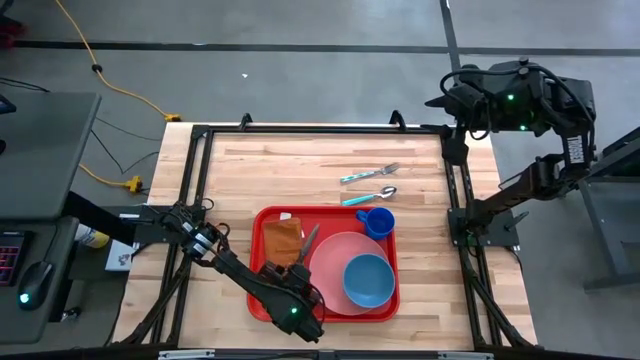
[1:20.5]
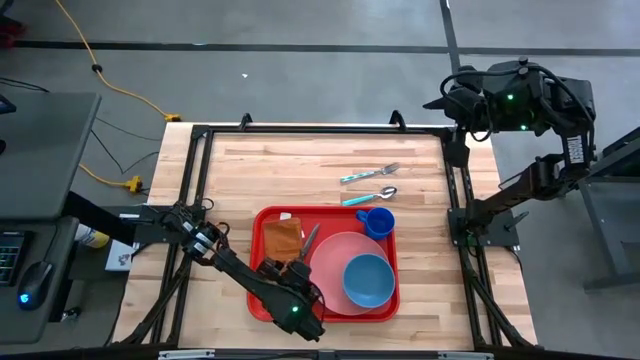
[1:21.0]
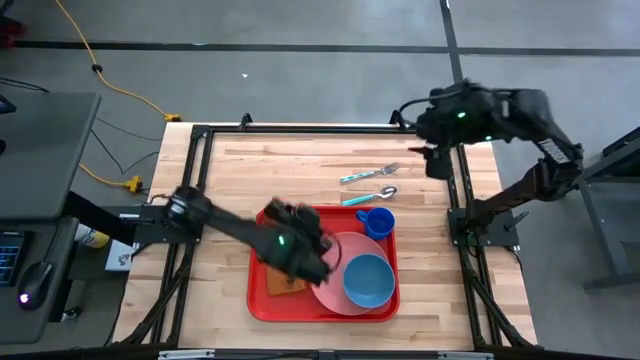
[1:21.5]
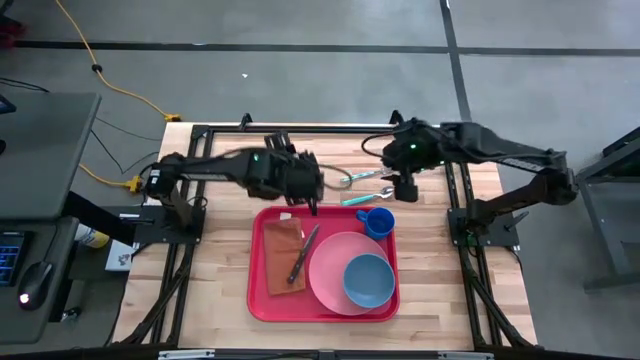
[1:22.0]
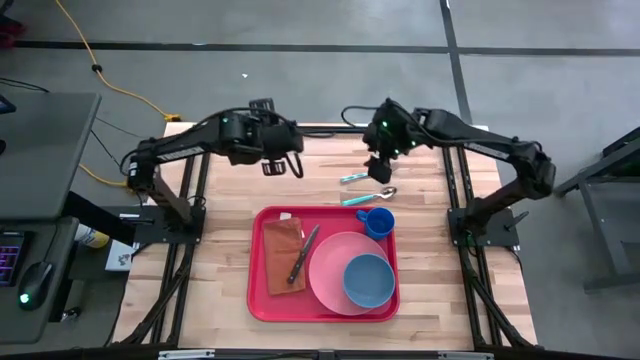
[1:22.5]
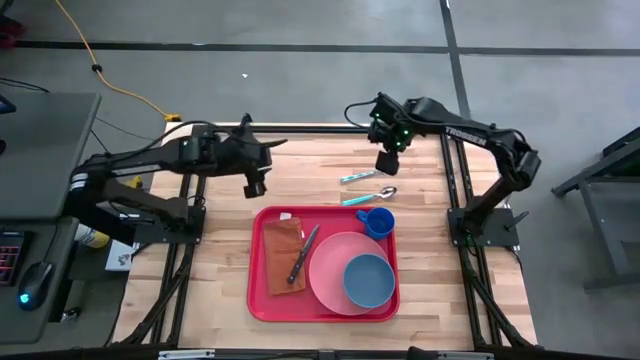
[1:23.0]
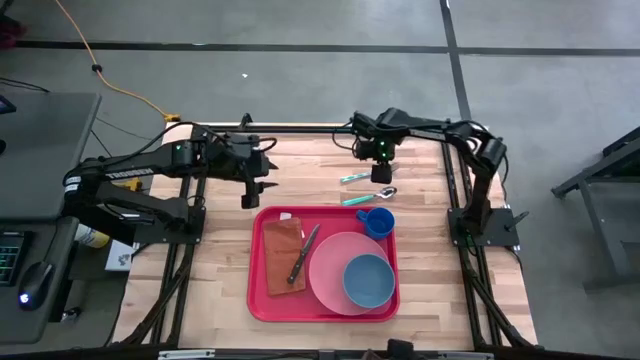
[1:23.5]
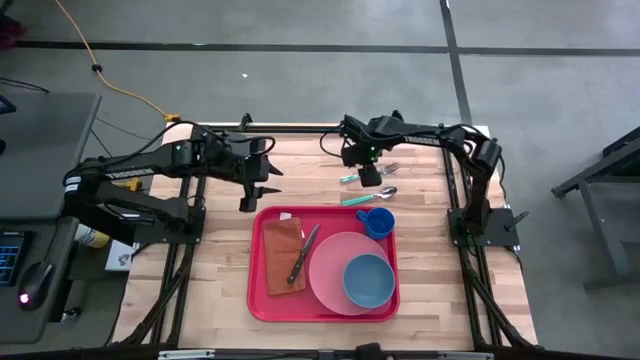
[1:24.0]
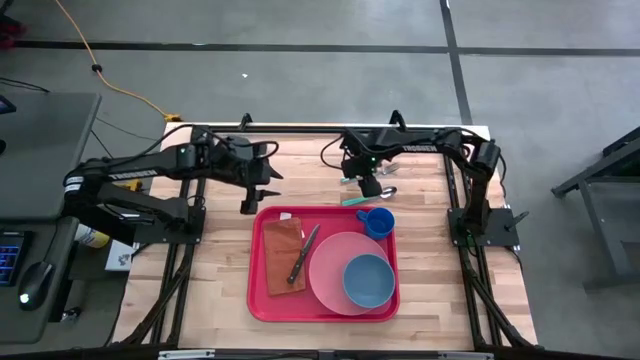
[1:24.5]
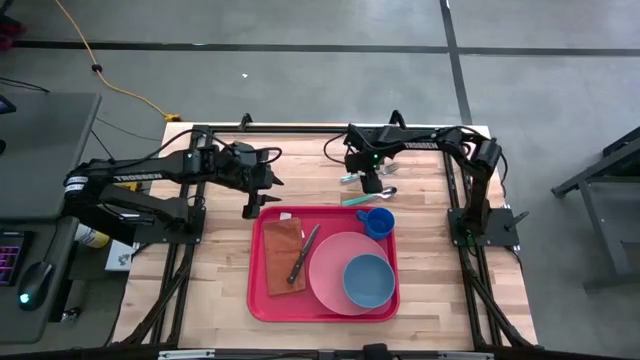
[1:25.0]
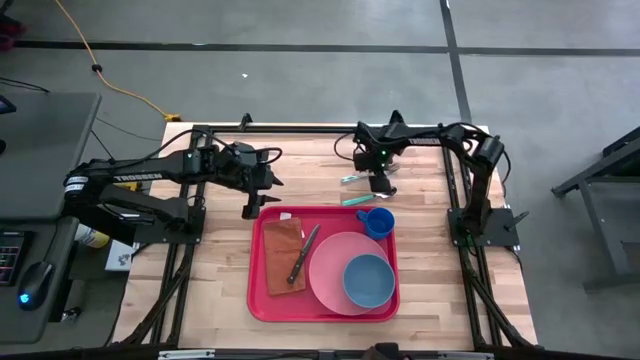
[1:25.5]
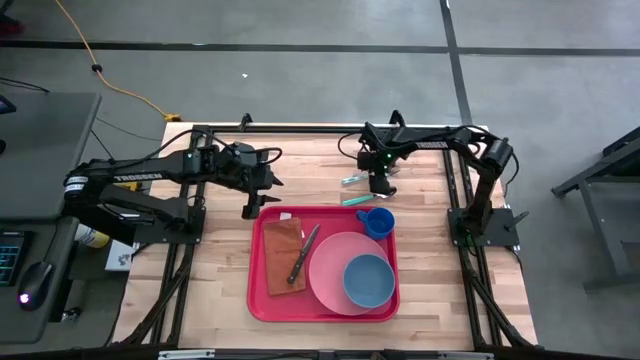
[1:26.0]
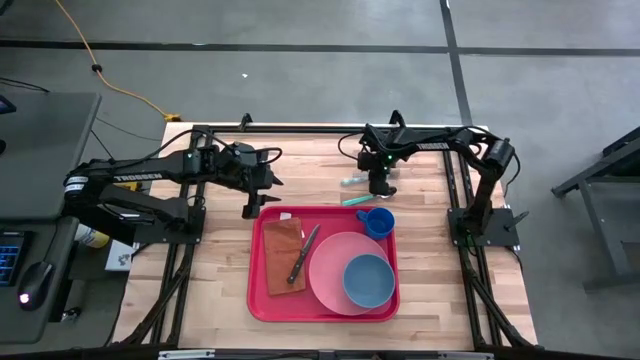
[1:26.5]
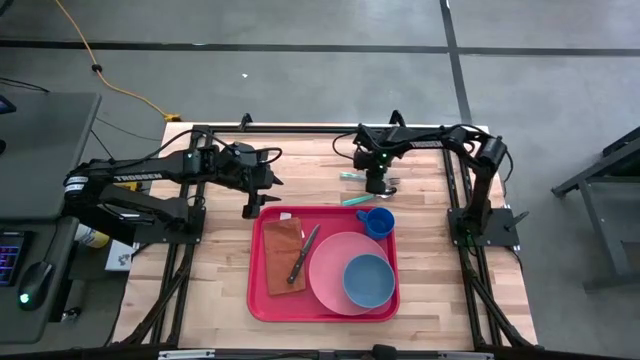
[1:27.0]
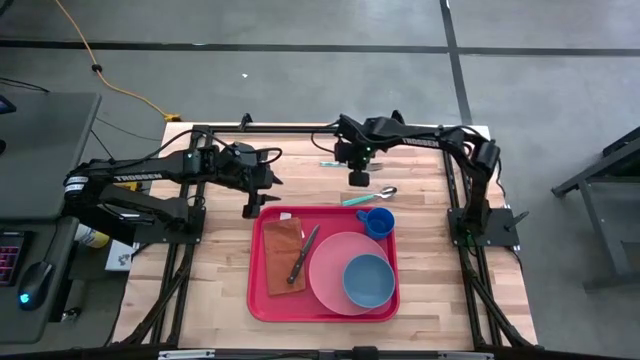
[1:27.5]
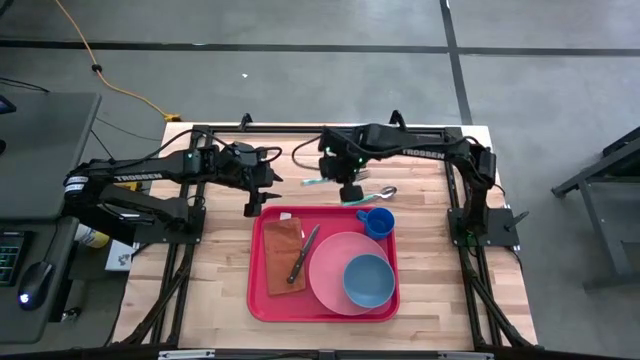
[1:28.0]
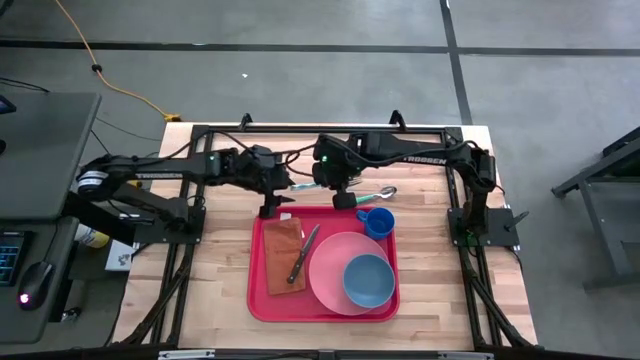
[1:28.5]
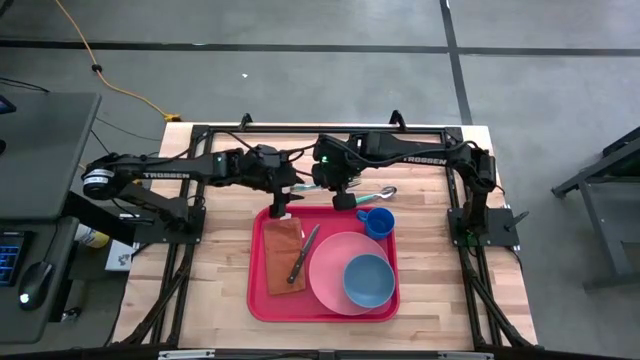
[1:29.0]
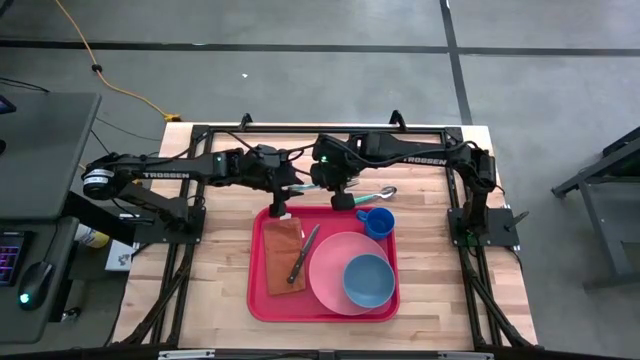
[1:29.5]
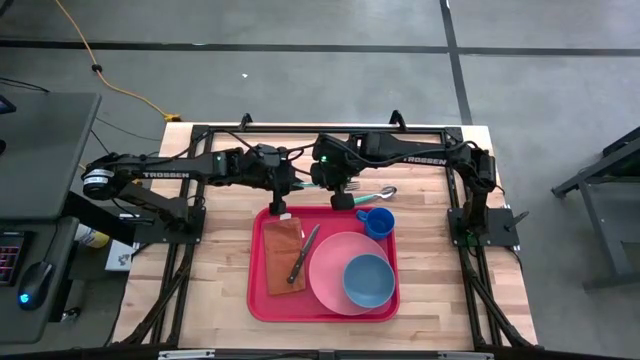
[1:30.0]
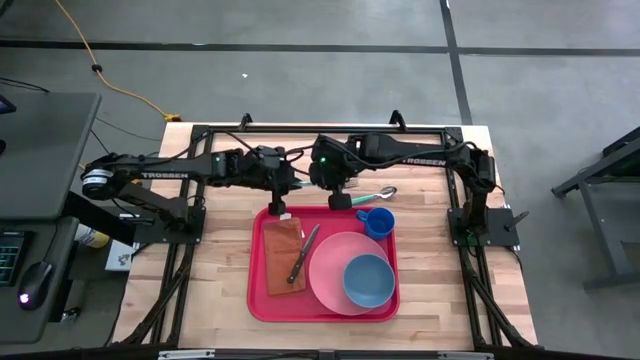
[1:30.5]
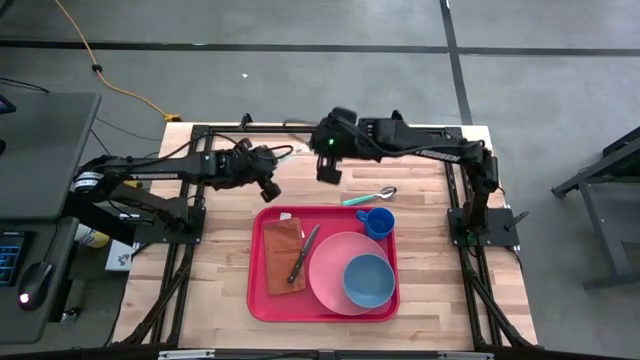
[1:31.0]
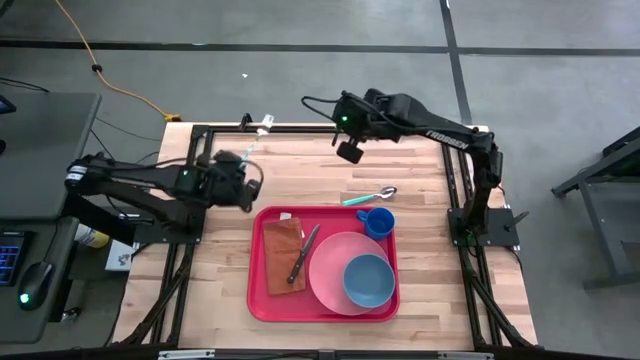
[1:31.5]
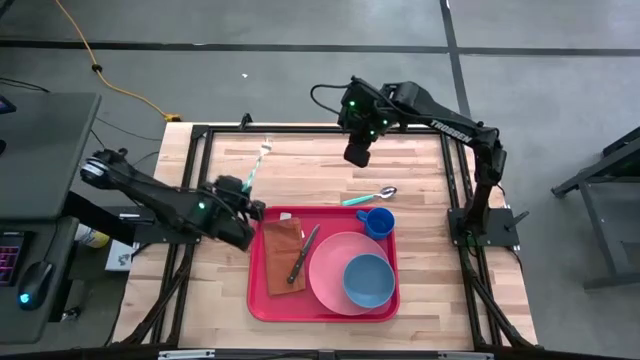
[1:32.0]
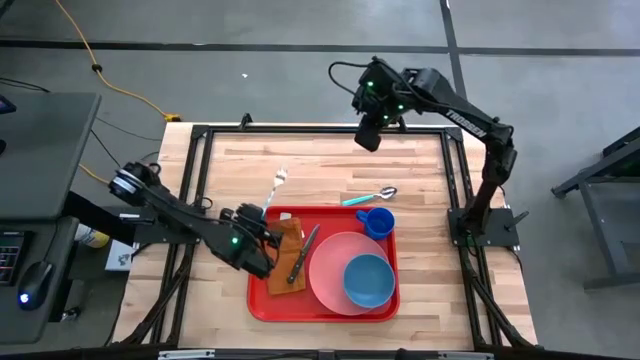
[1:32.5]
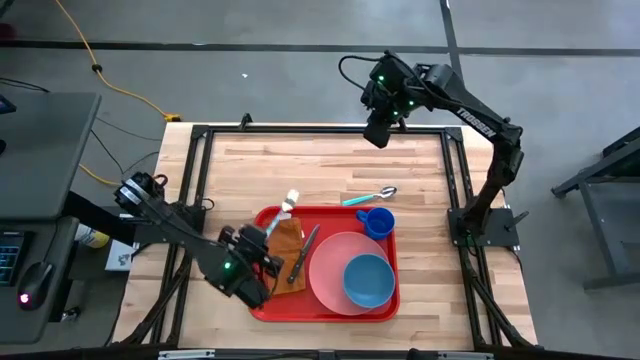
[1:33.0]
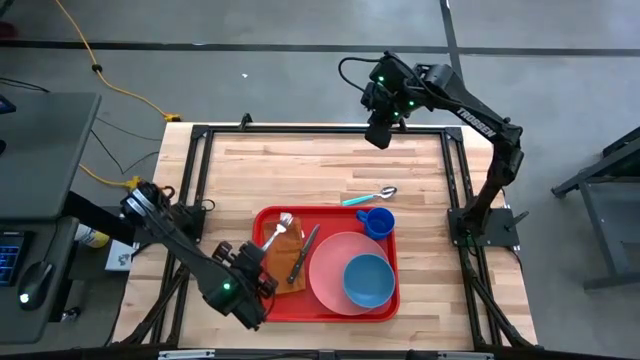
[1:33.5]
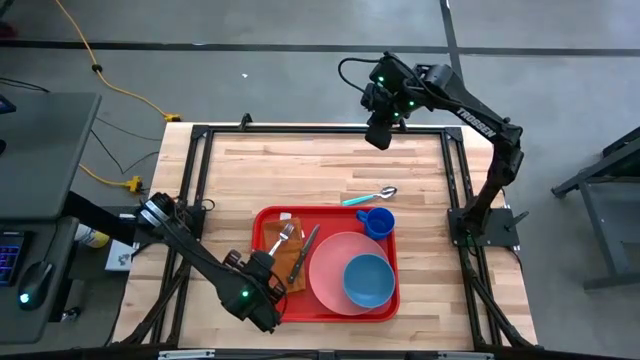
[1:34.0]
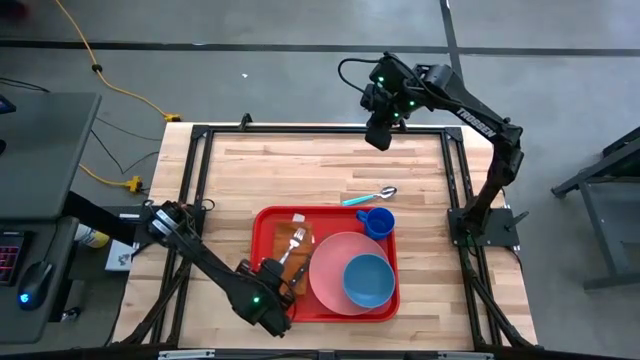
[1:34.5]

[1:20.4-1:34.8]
Task: Set up tray
Put the blue fork on top of the orange napkin on the serving tray

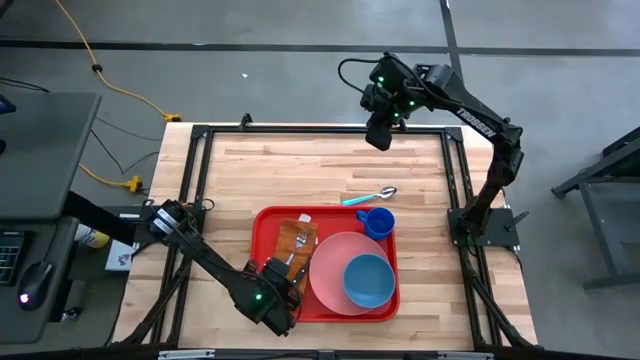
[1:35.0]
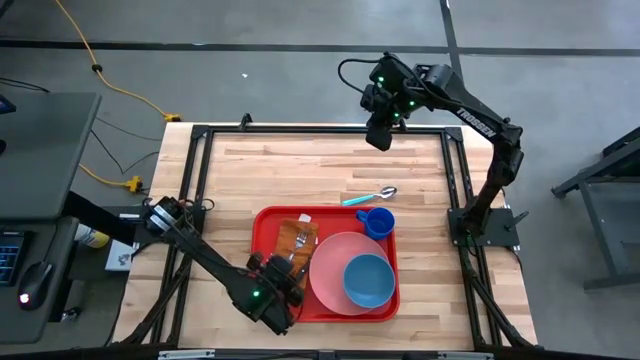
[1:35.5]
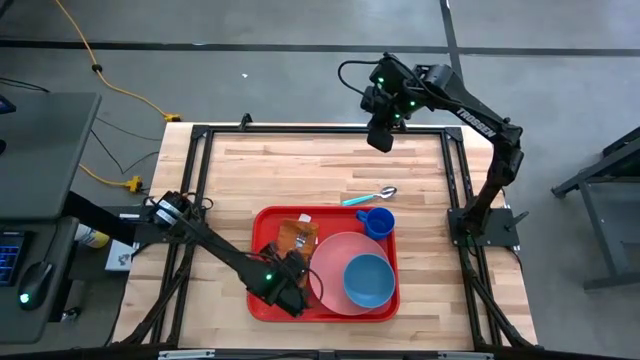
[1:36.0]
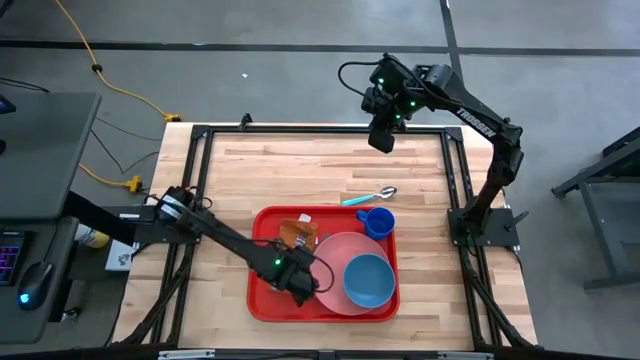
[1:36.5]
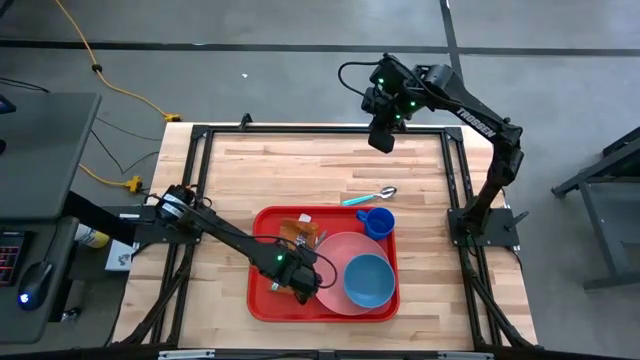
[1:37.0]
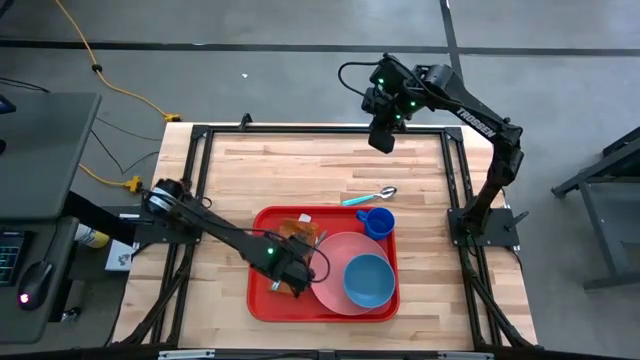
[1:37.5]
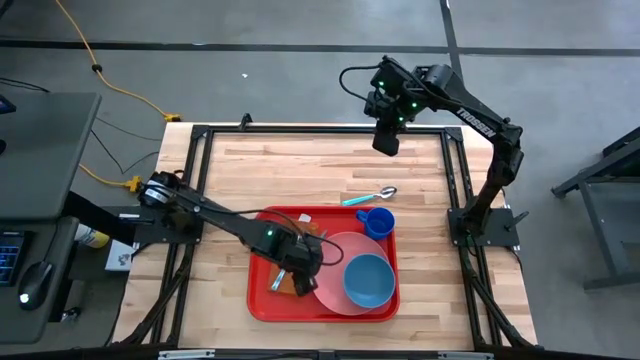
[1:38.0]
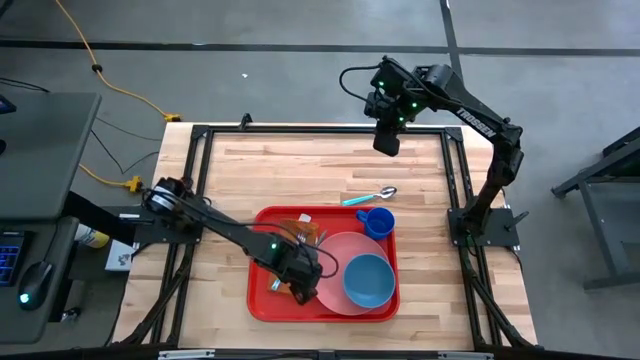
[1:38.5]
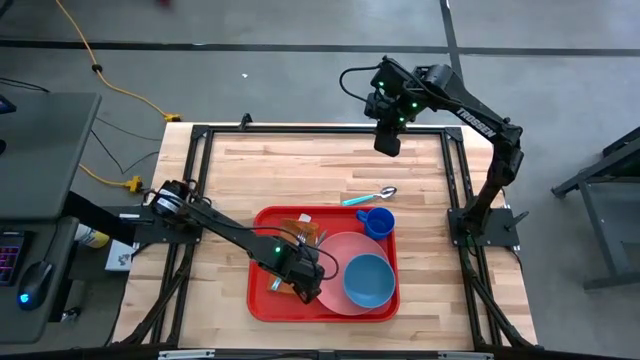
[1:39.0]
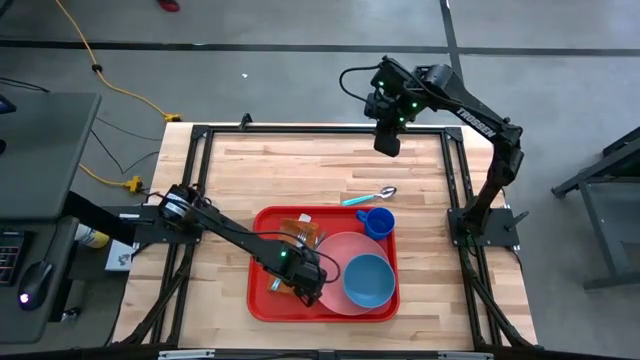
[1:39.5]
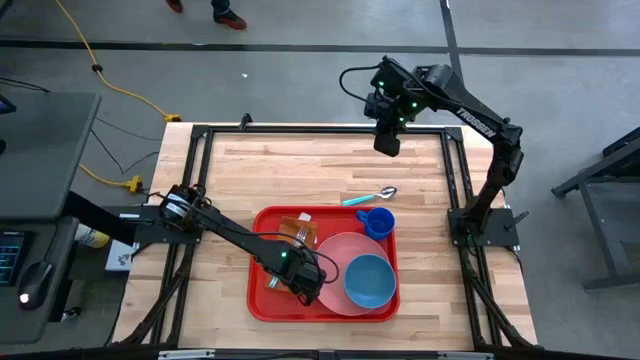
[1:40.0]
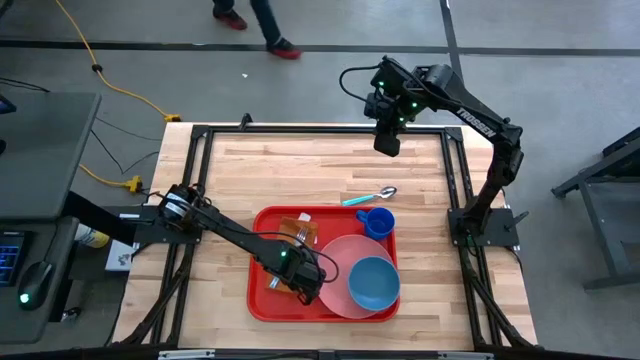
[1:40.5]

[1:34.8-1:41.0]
Adjust the knife on the orange napkin

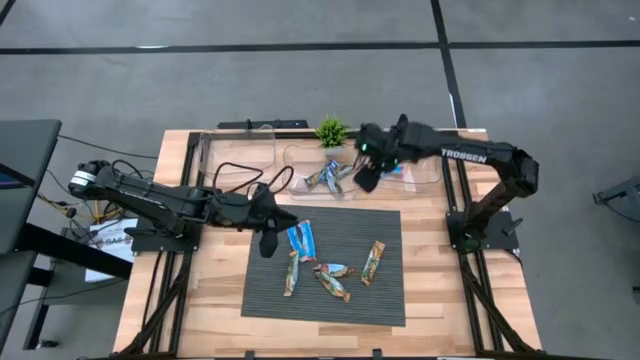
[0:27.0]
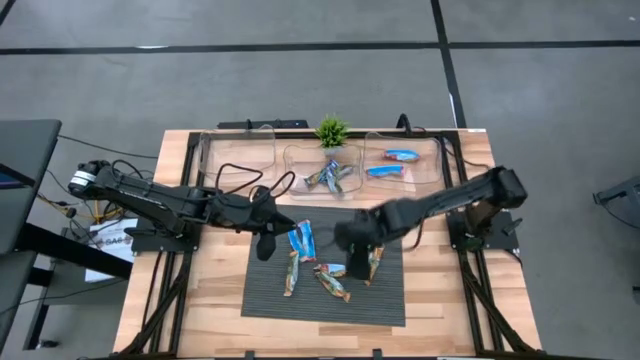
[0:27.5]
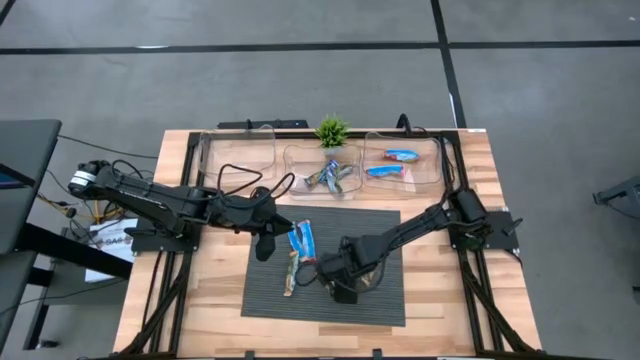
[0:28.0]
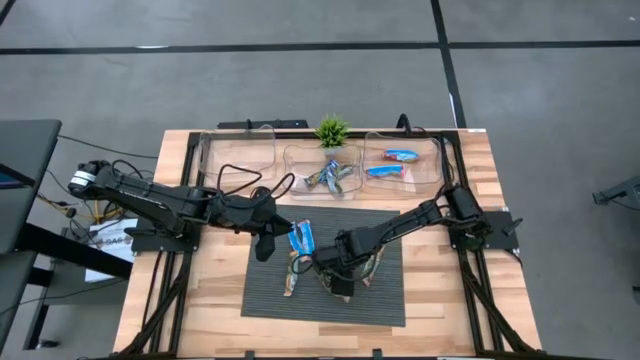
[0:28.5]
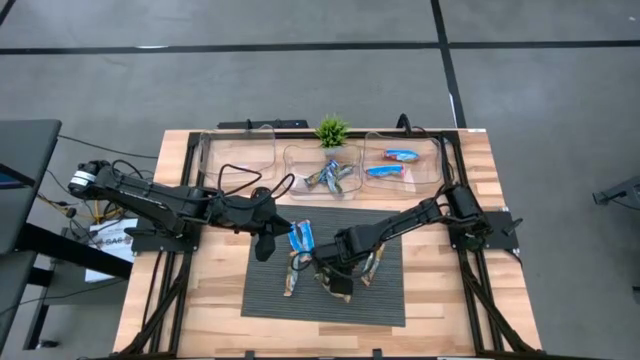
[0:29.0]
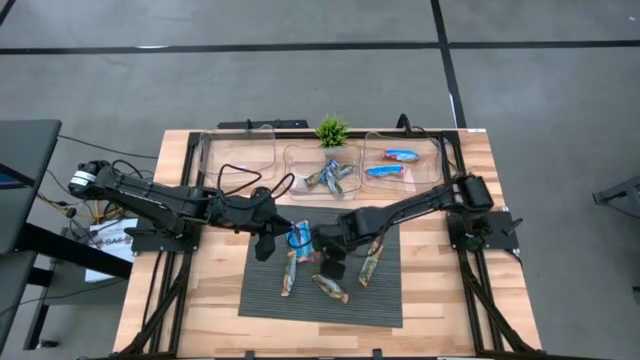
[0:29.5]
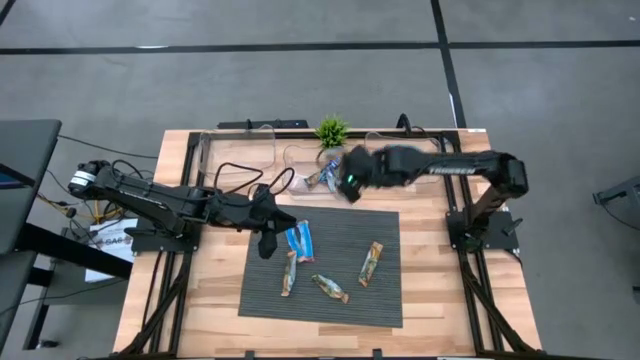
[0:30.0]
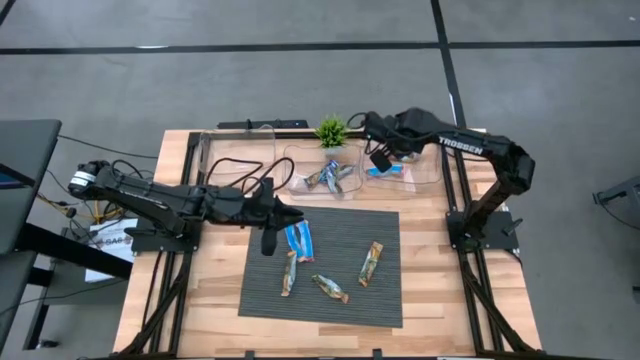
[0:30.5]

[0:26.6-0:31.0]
Task: Pick and place Granola Bars by type
Put the red granola bar into the right transparent bin
